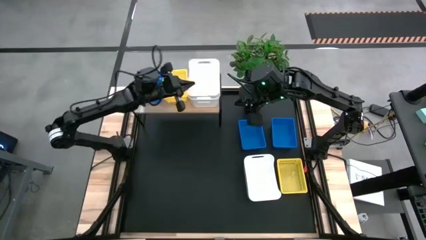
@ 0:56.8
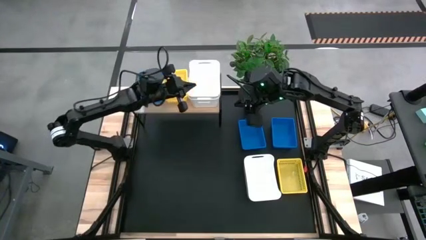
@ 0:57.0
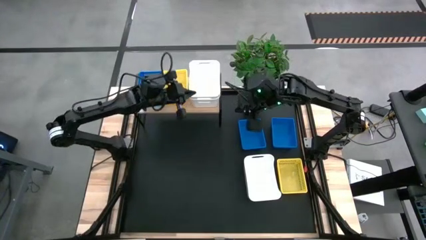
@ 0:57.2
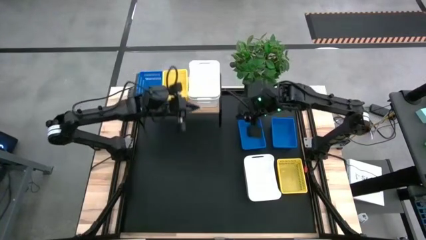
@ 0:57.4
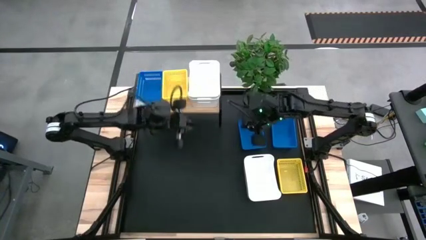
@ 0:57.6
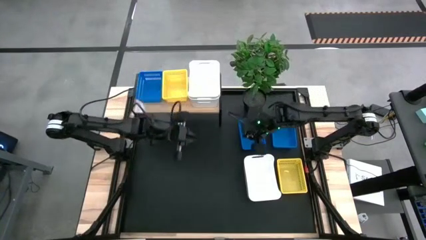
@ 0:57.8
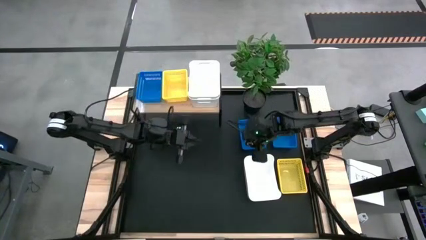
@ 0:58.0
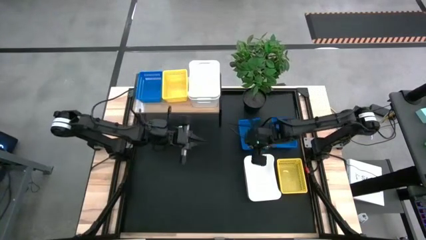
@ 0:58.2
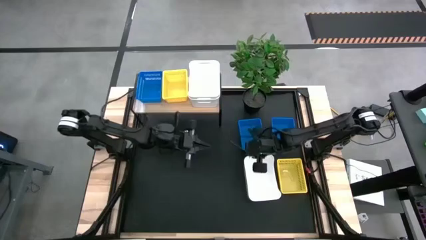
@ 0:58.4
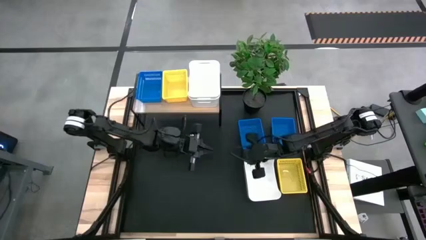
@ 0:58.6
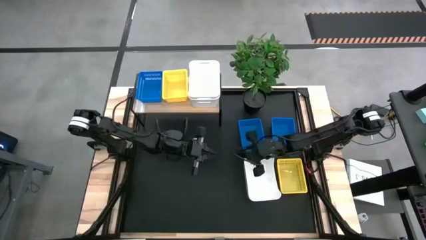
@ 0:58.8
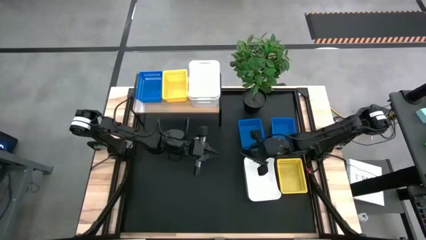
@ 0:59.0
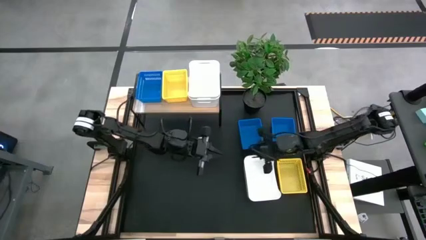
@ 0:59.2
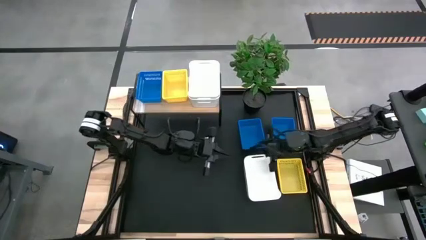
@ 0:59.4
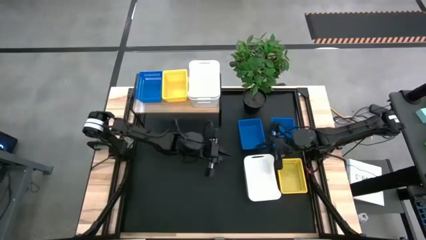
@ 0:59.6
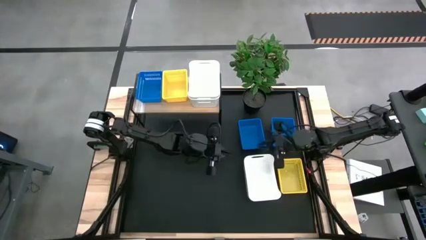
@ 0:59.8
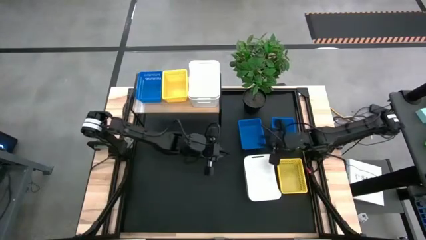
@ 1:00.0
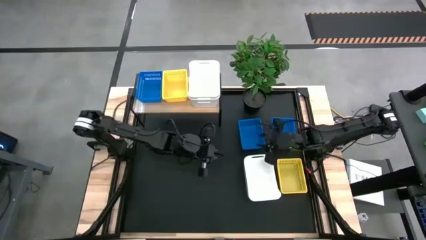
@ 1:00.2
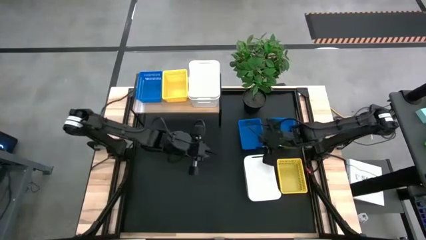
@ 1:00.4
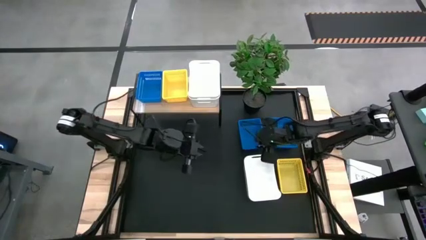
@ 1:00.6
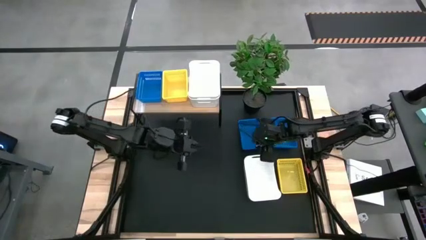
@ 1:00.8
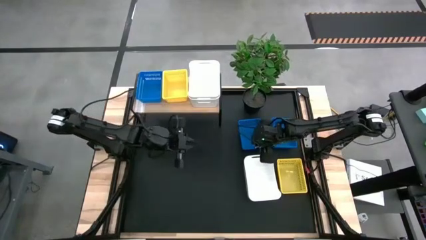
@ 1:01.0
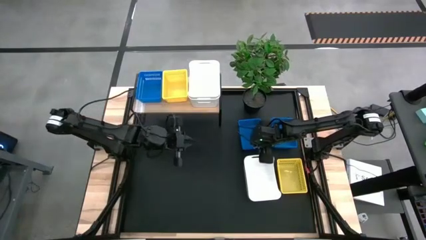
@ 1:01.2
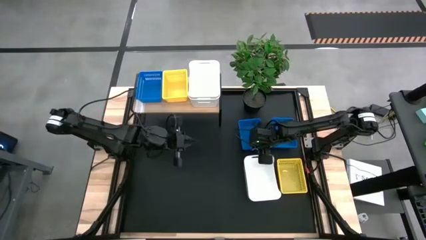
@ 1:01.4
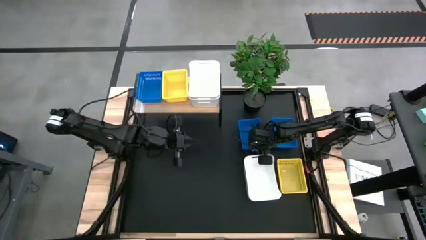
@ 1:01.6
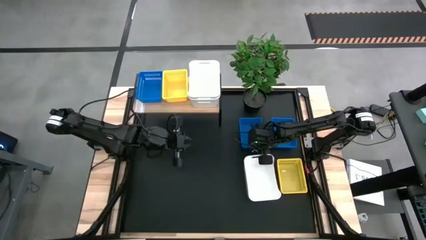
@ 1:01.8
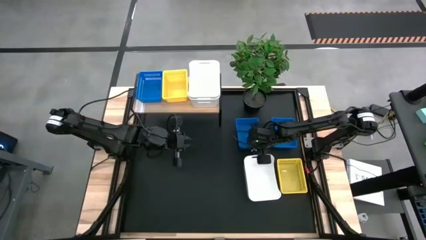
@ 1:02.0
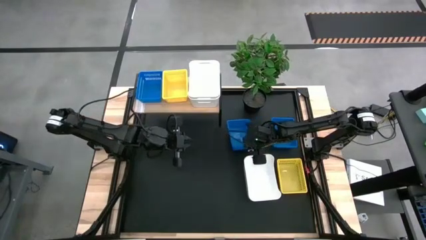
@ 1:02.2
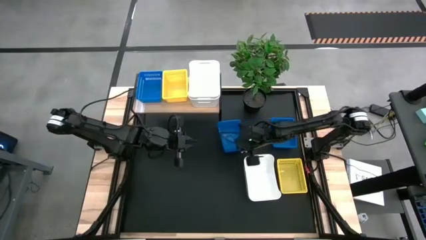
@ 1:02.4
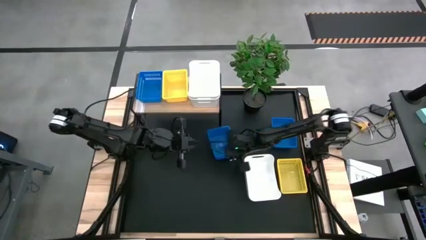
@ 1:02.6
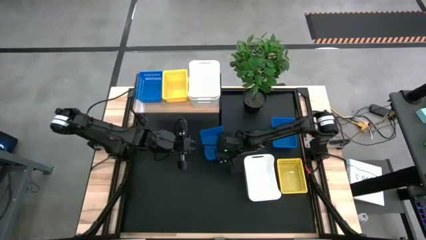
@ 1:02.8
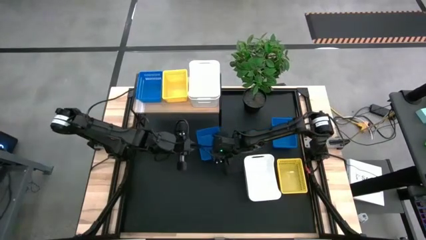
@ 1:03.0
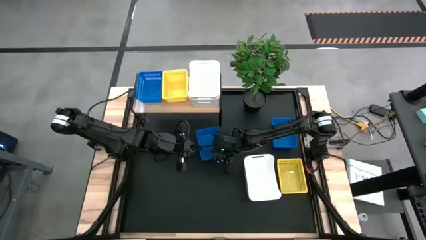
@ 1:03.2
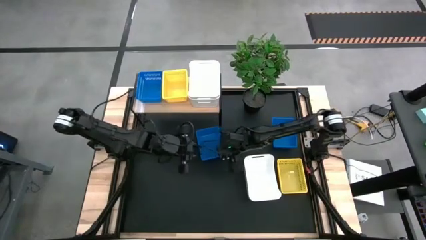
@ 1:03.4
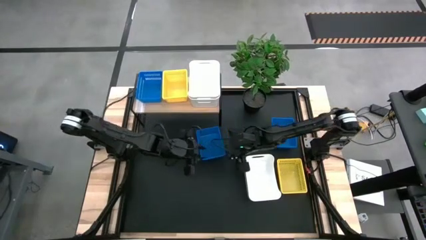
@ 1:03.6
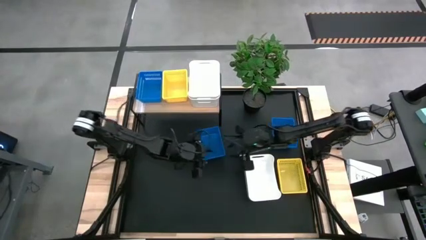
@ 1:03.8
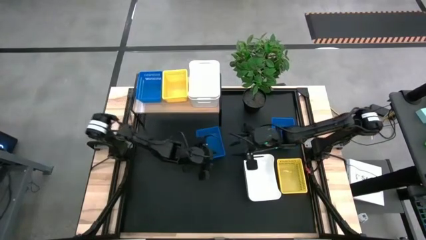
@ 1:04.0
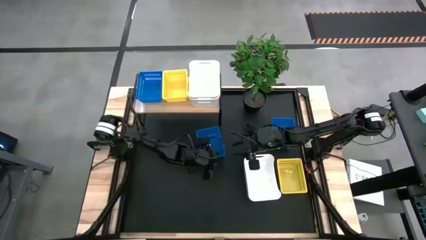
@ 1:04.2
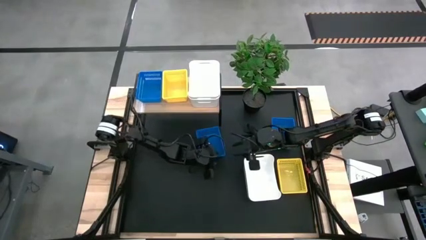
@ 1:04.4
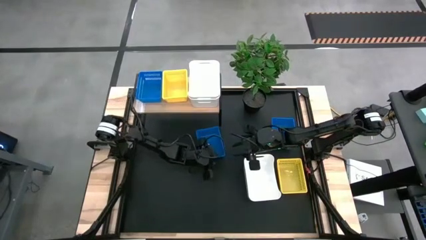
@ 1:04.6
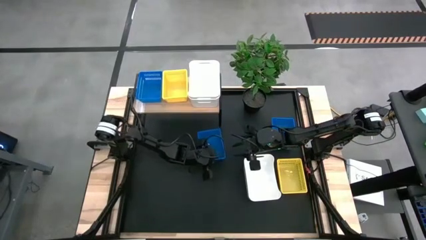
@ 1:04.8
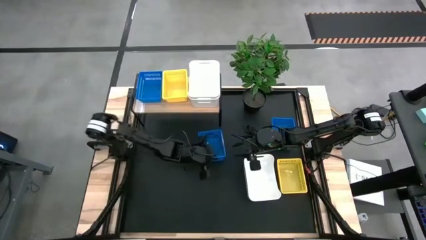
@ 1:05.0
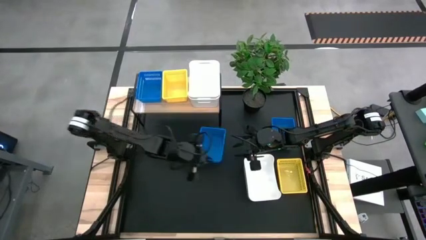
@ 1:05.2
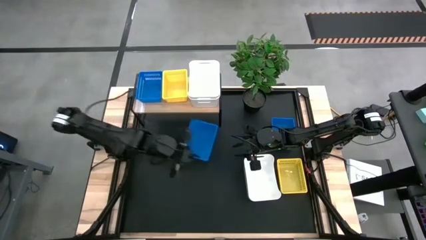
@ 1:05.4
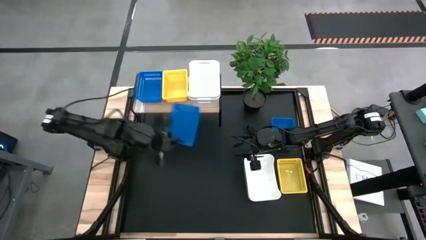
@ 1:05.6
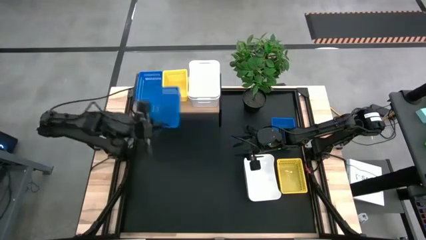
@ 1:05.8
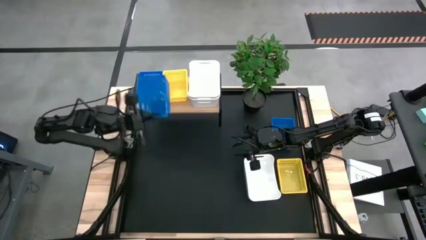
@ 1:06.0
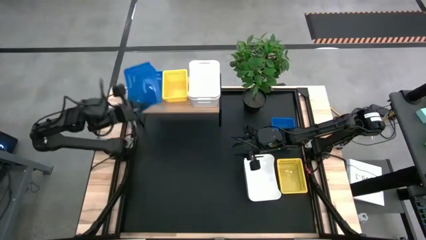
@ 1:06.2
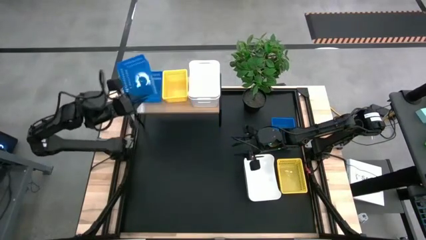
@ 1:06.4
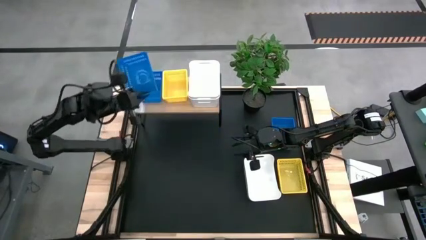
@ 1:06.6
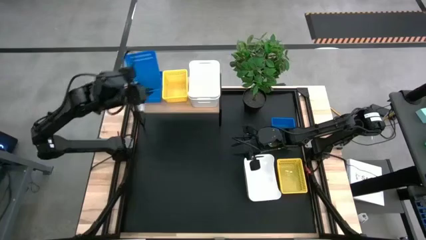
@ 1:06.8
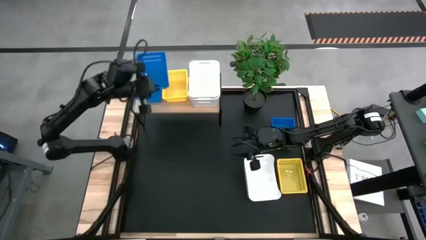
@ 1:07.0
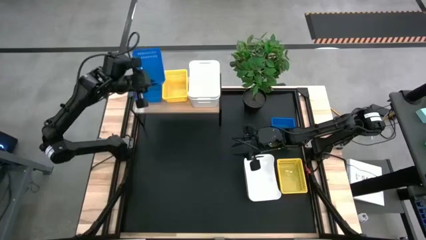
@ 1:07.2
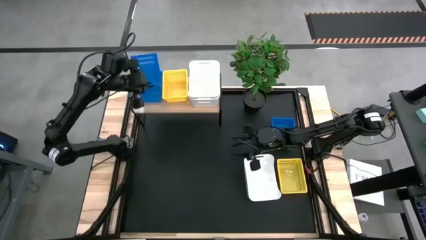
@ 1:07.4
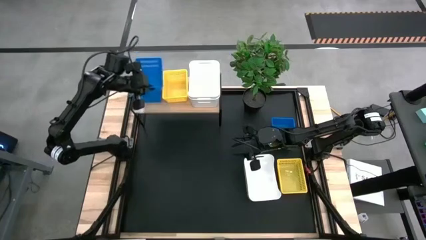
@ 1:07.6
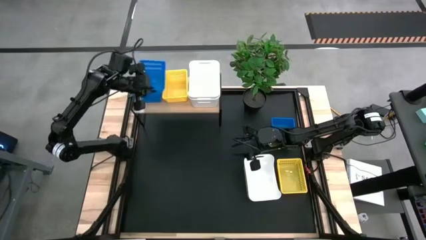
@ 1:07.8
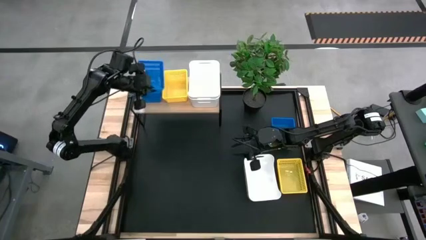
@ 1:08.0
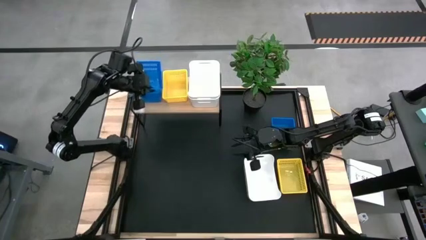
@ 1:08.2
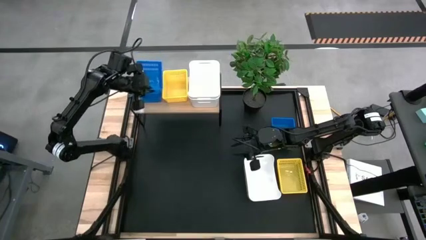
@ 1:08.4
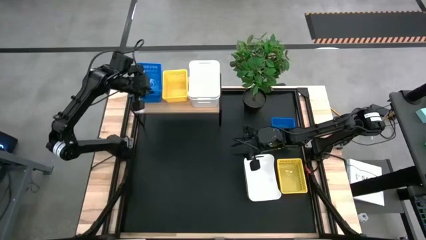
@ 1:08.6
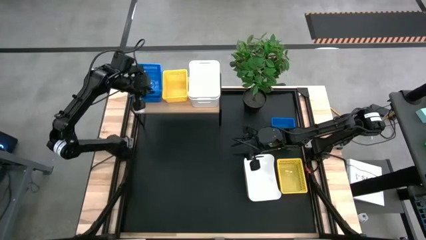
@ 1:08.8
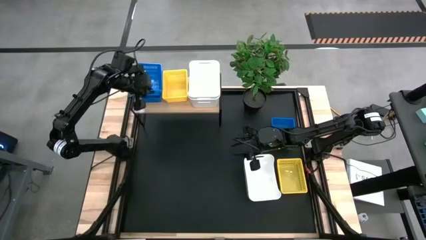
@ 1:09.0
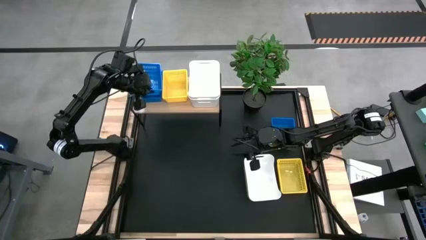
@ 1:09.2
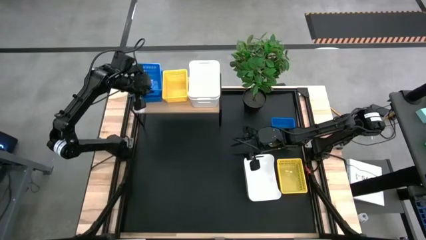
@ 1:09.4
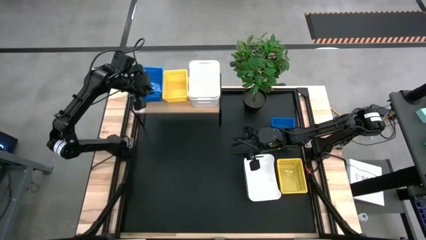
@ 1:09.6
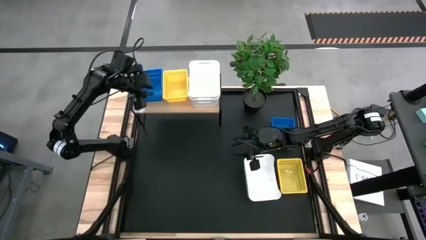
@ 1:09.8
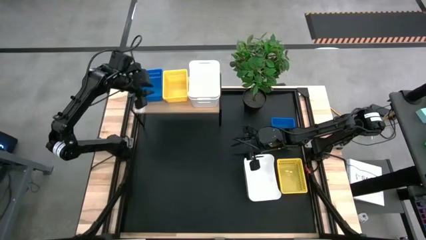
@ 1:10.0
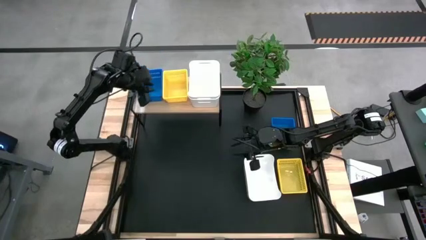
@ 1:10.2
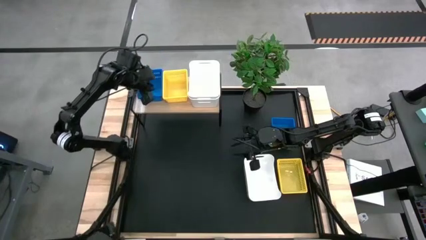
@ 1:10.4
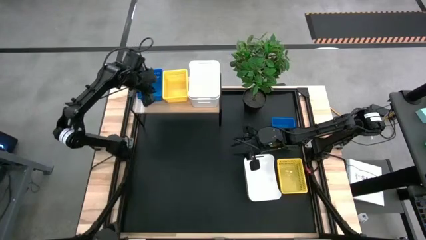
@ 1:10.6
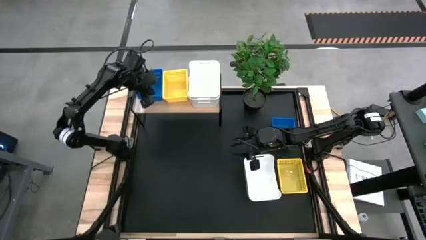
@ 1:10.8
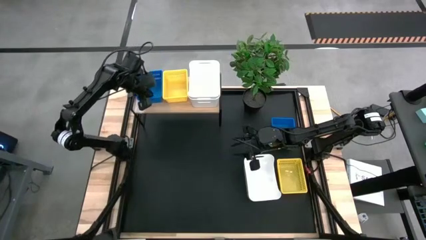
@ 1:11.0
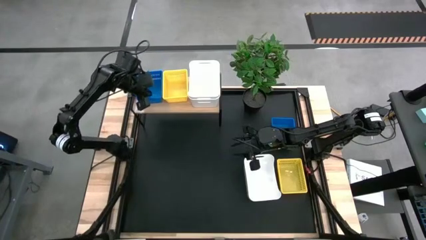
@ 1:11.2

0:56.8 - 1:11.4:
Task: Stack baskets on shelf by color
Stack the left blue bin into the blue bin on the shelf
